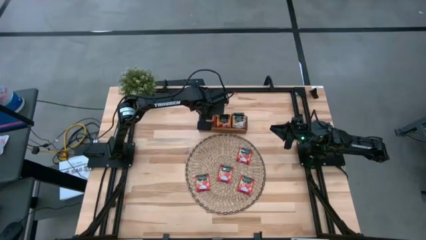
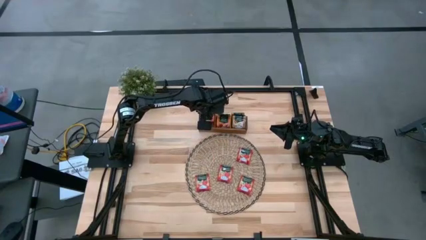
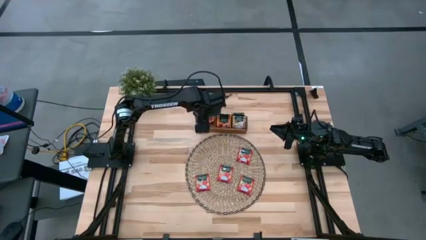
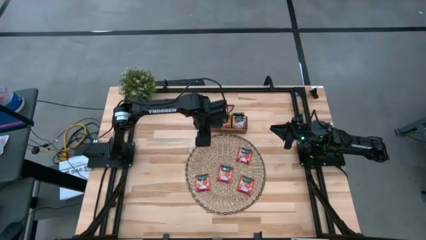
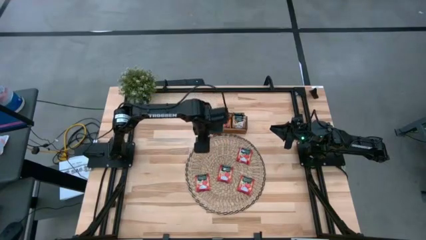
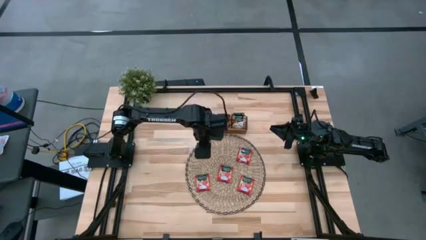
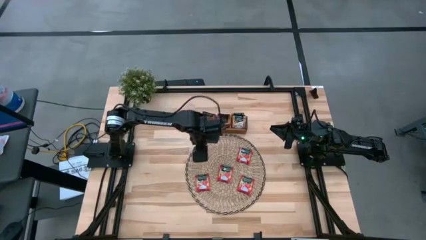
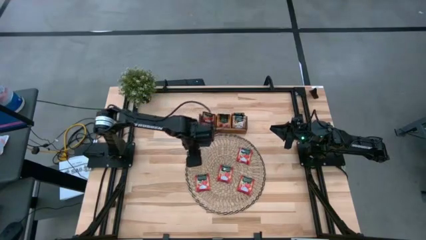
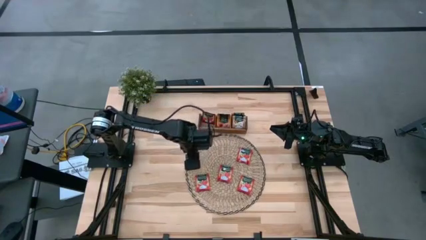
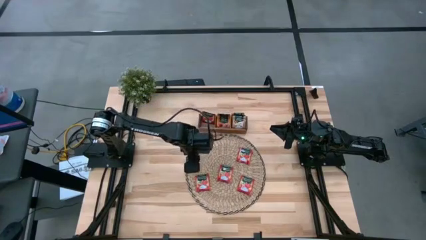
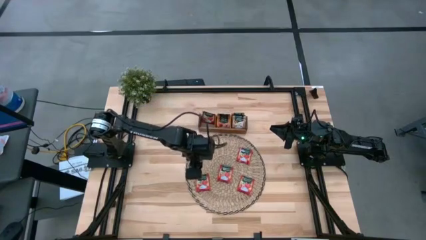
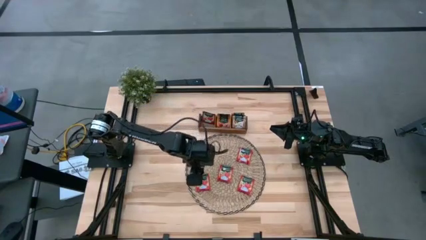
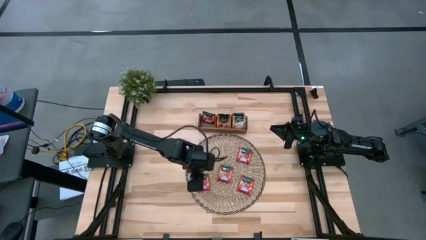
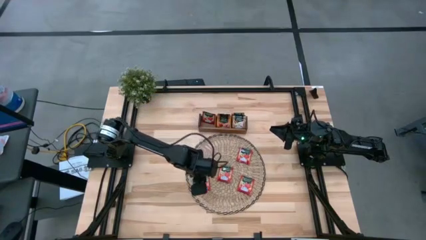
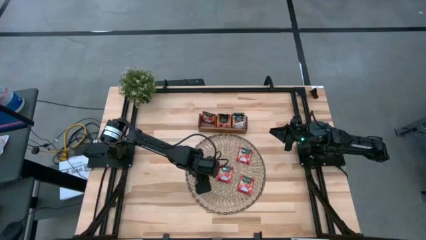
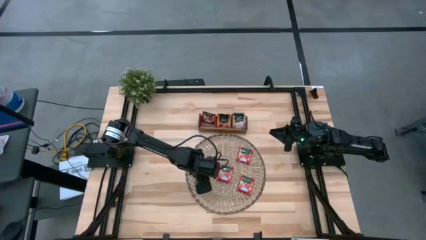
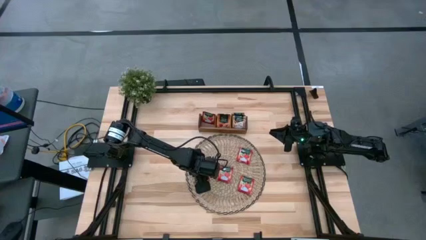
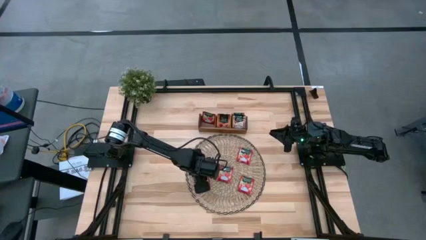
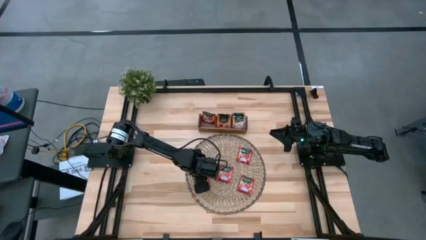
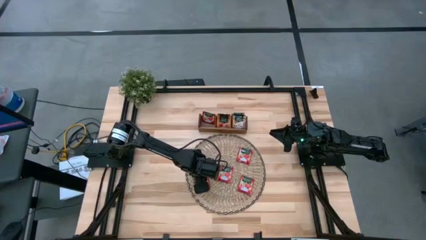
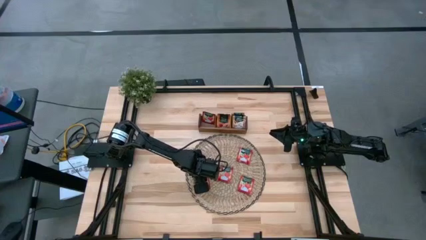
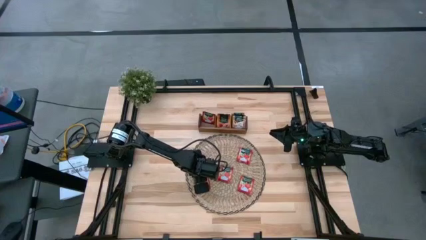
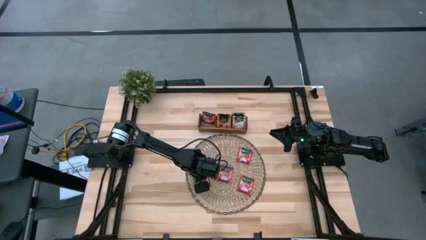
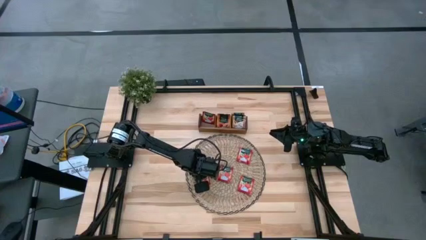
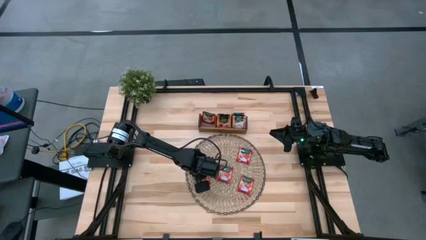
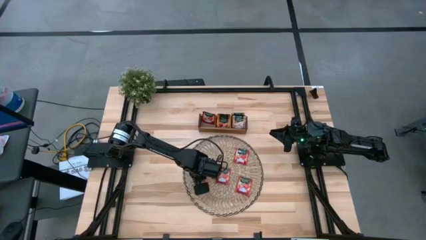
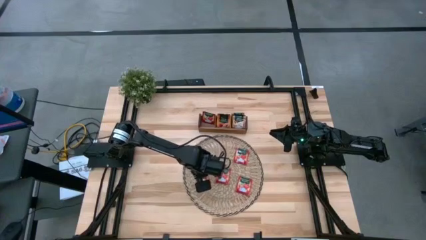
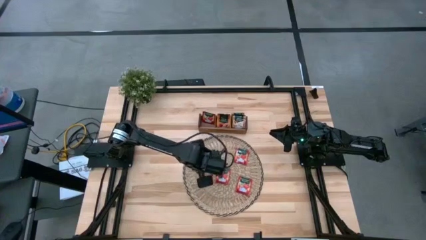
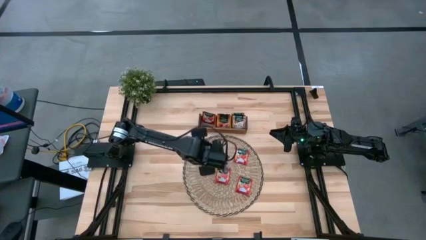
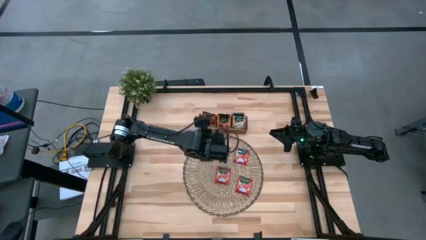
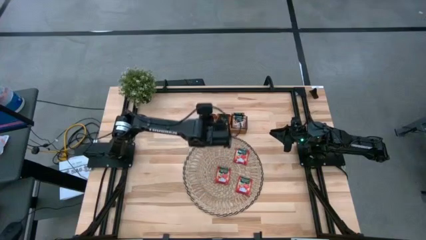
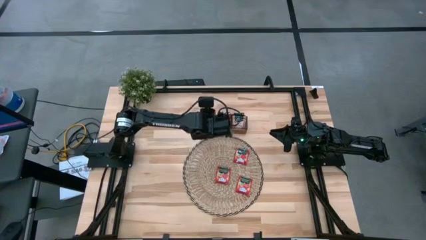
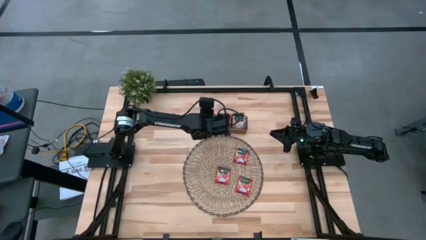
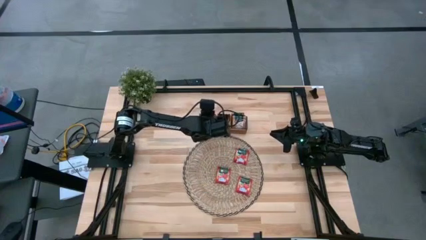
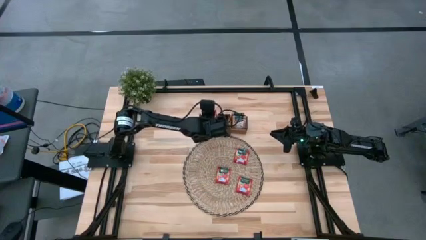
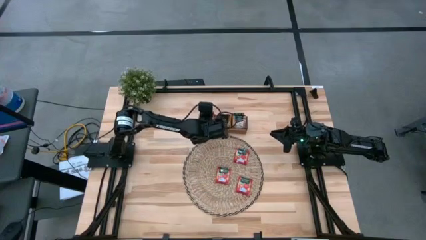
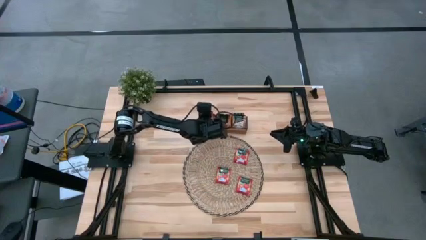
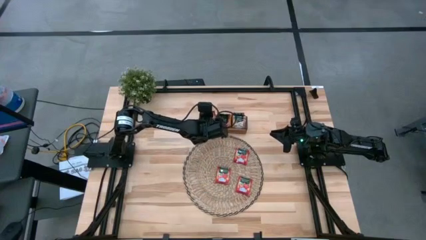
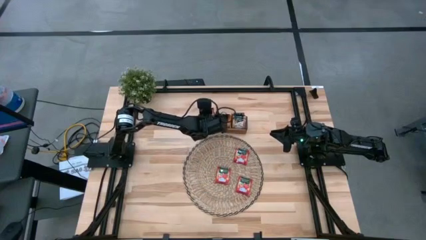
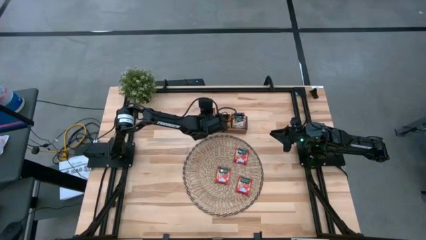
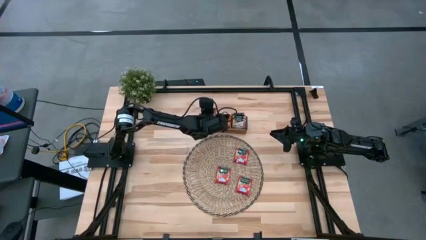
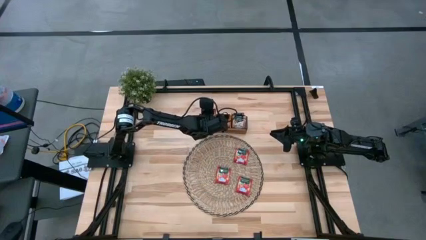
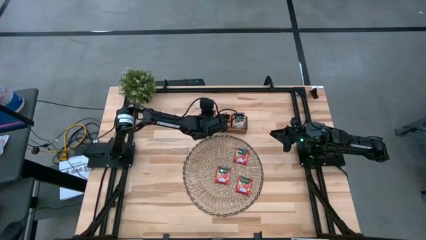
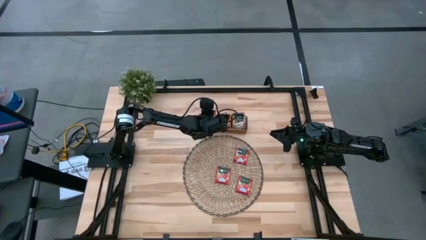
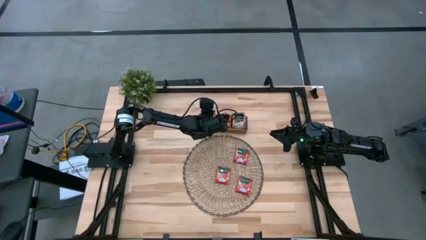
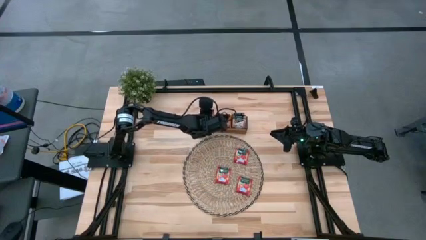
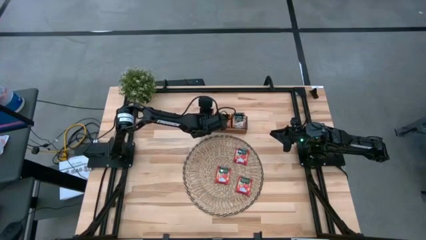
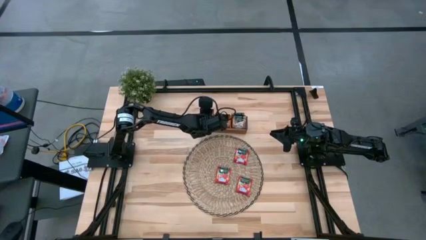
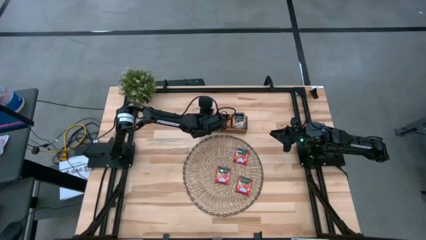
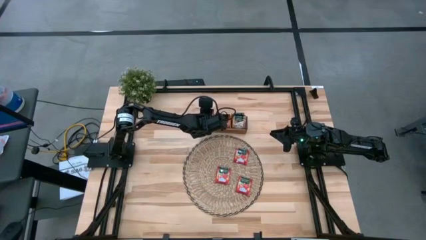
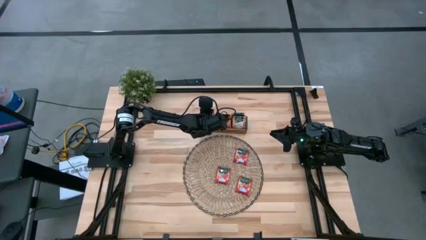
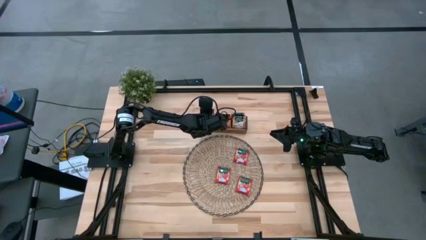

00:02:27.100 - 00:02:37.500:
Task: Pick & Place Tea
Put the red tea bag into the left section of the wooden organizer

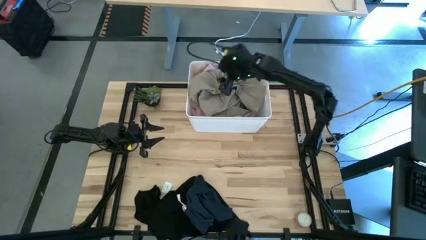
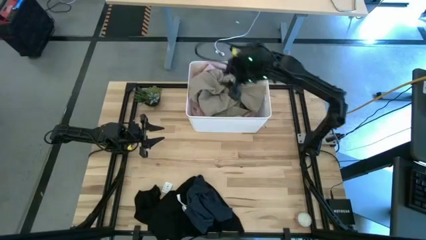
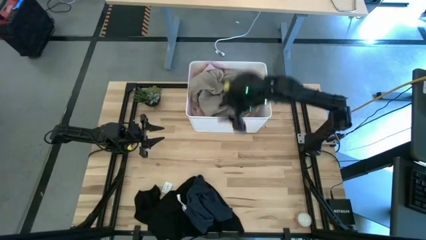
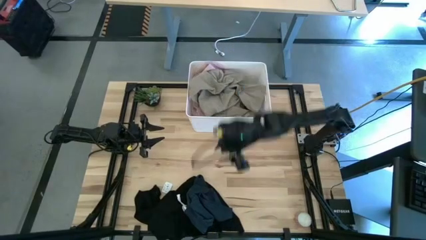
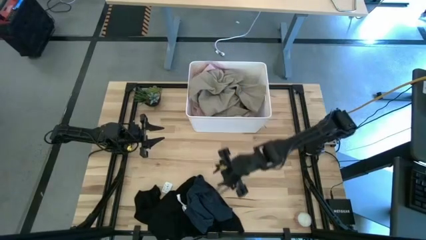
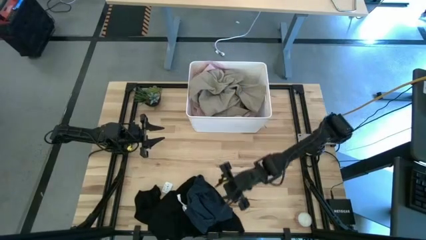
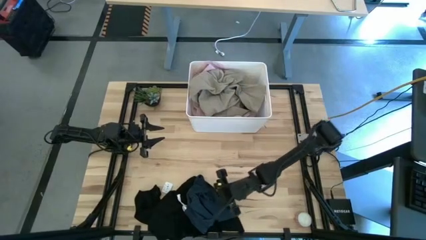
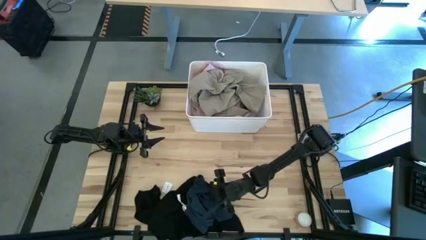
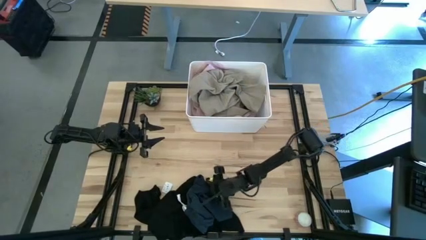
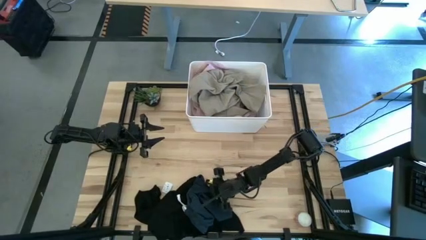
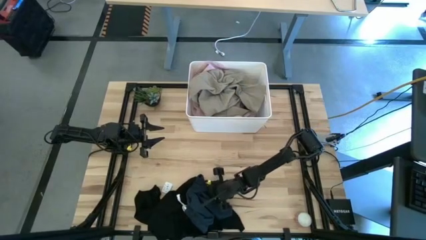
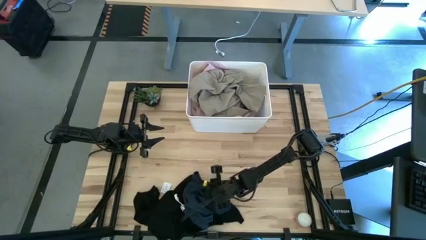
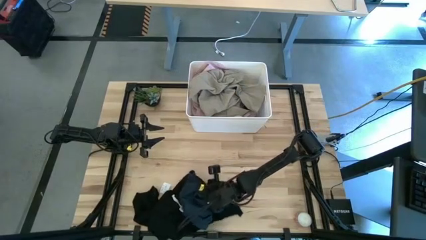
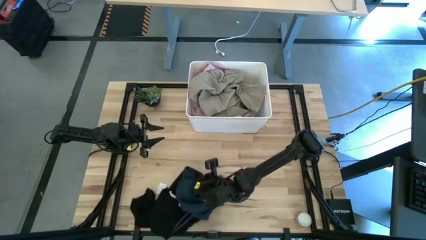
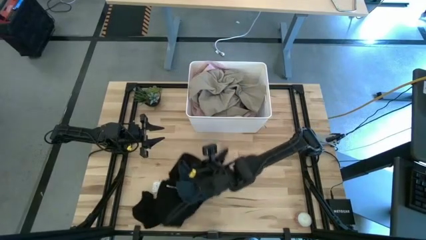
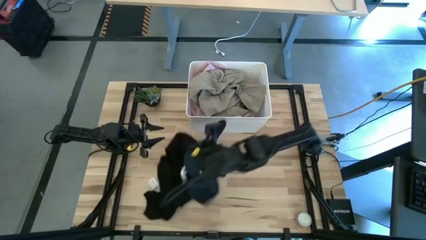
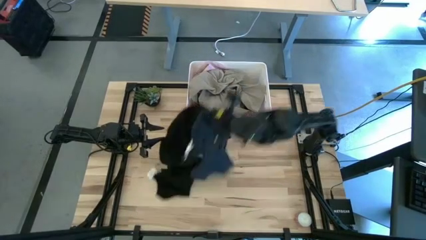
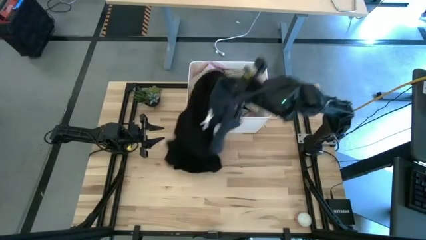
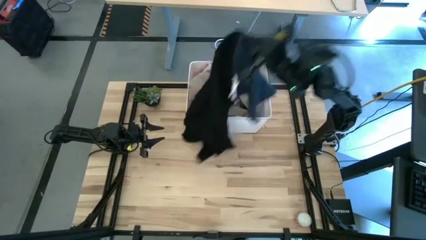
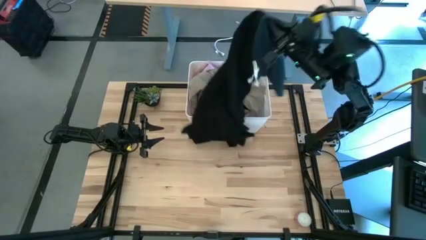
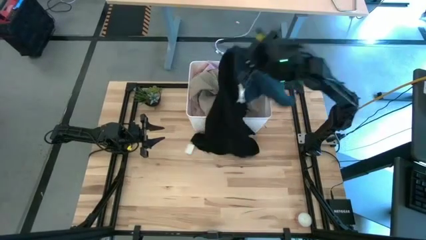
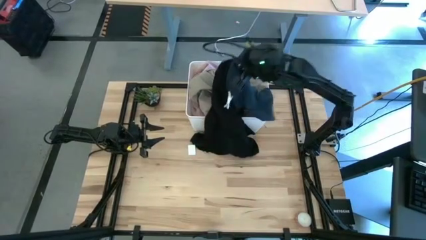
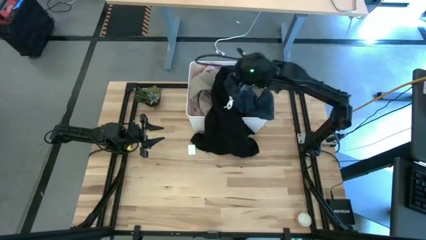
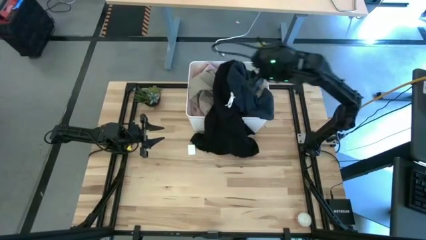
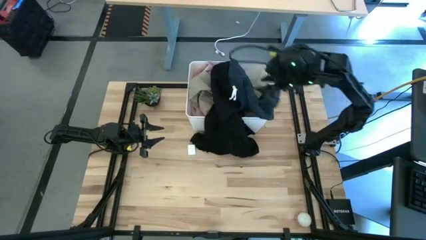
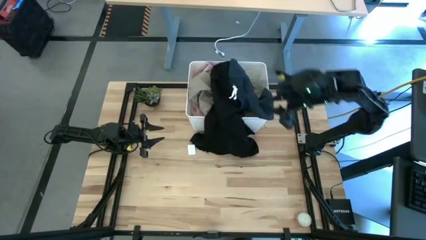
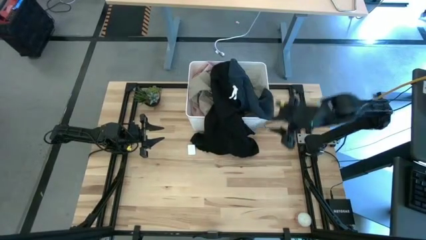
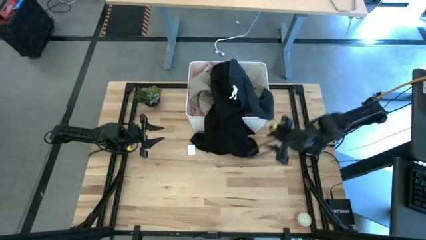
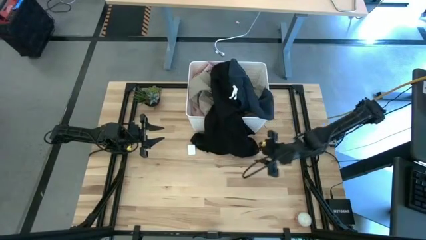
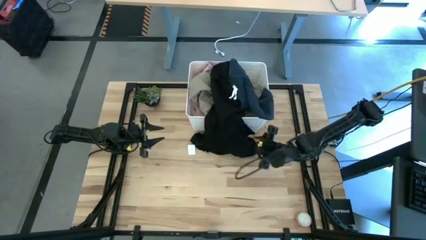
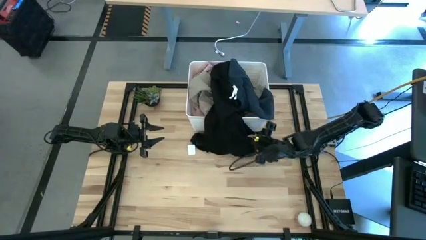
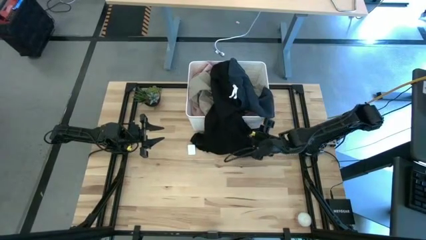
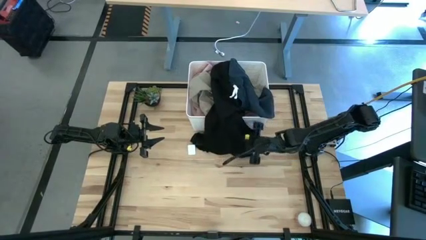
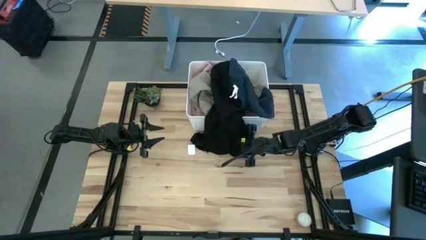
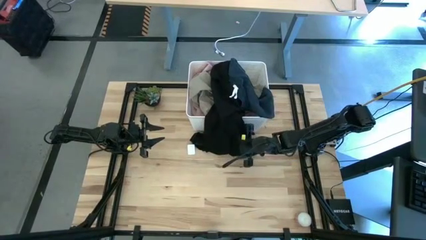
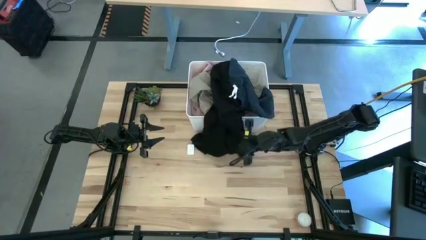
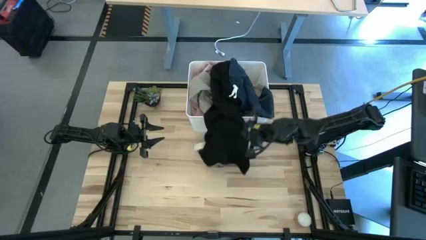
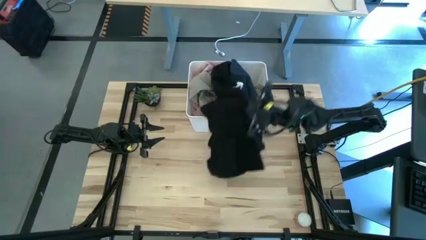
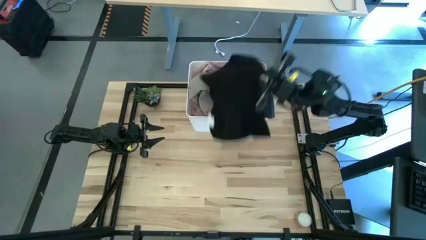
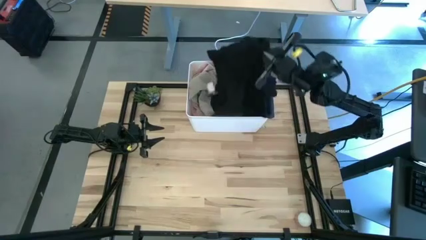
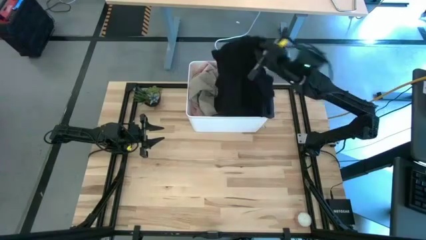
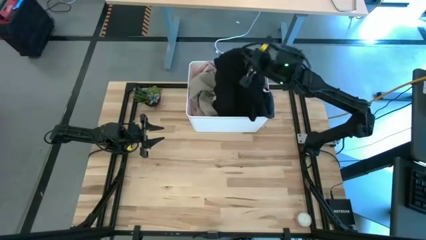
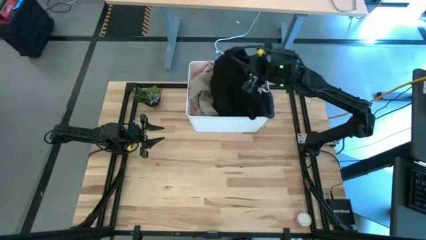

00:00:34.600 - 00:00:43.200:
Task: Sort clothes
Put the blue shorts and black pants into the white laundry bin
